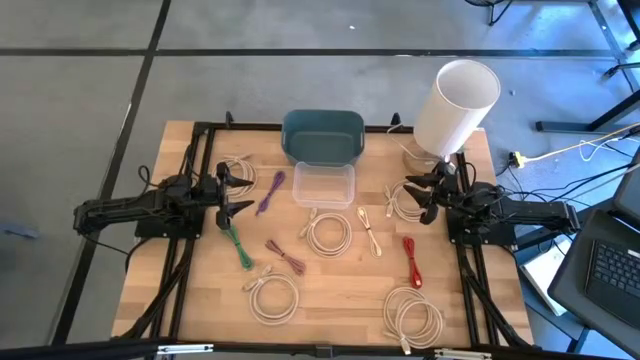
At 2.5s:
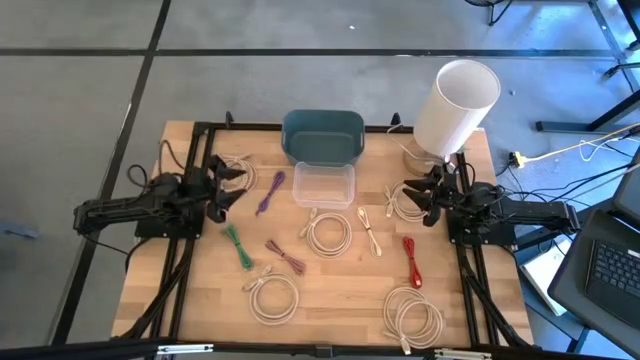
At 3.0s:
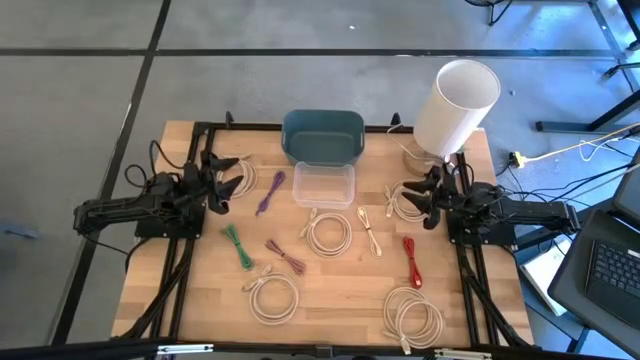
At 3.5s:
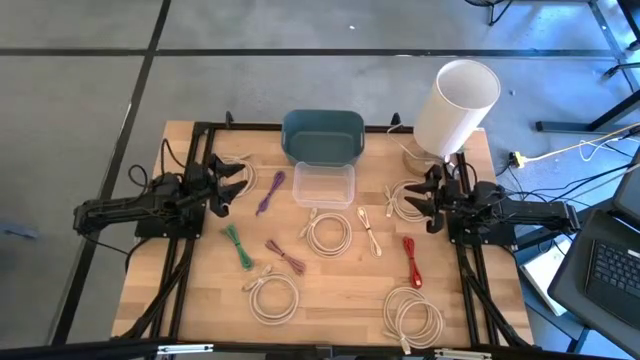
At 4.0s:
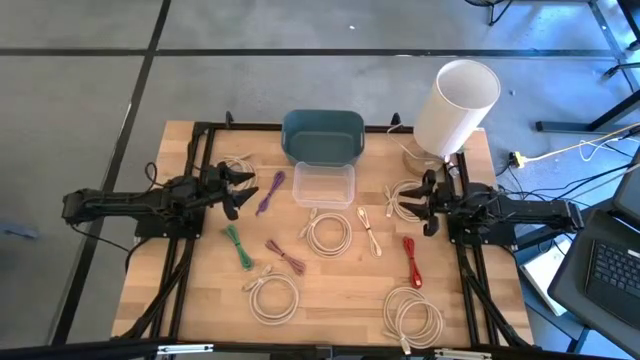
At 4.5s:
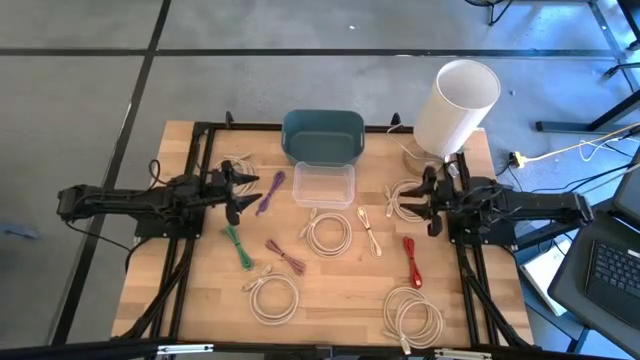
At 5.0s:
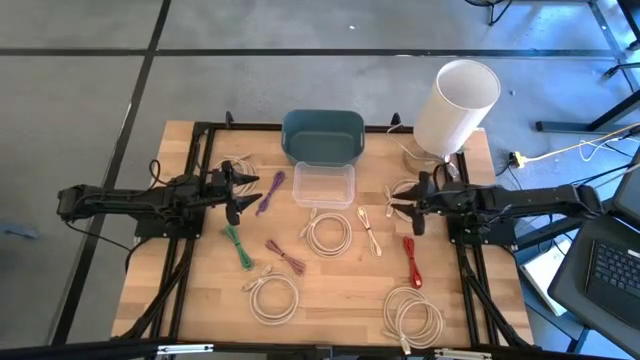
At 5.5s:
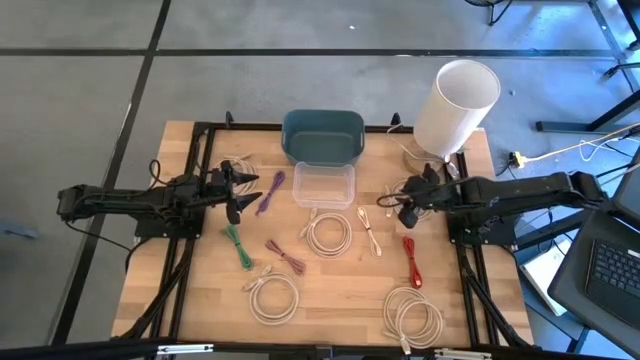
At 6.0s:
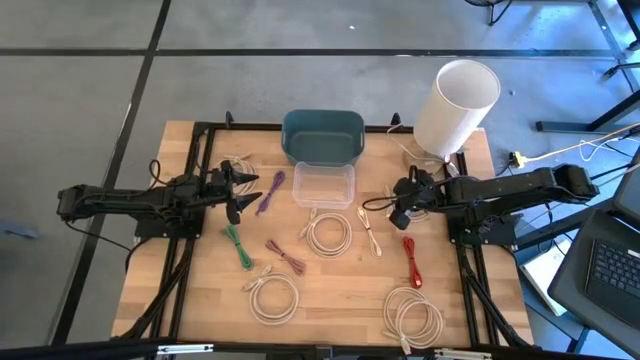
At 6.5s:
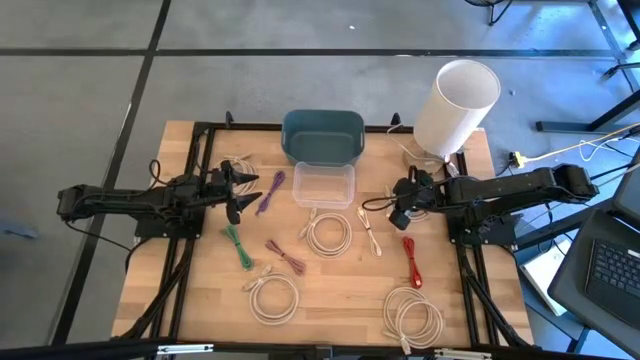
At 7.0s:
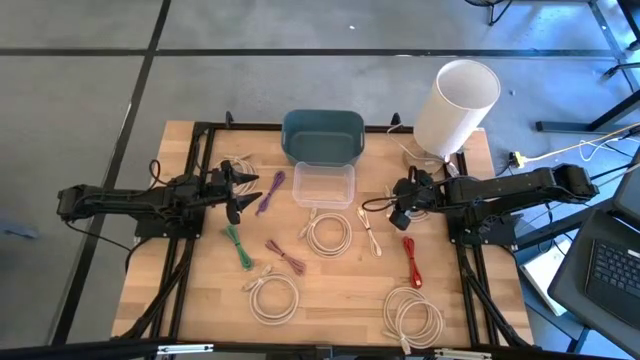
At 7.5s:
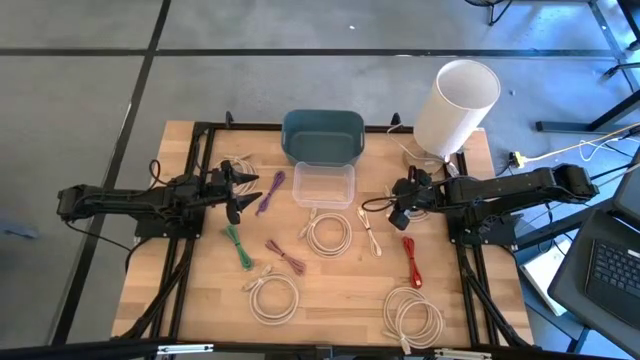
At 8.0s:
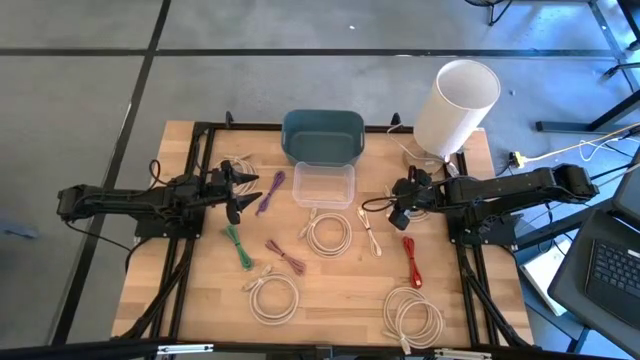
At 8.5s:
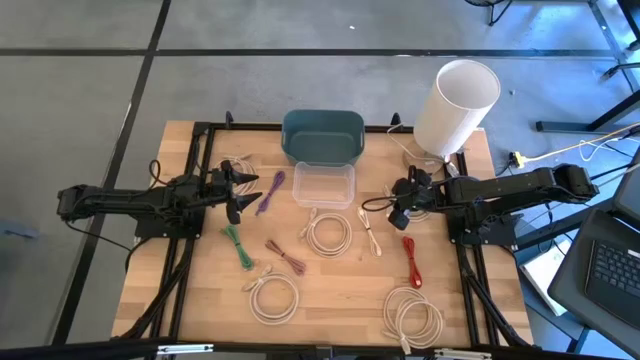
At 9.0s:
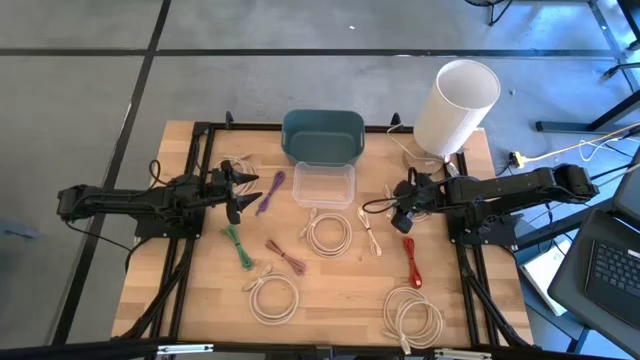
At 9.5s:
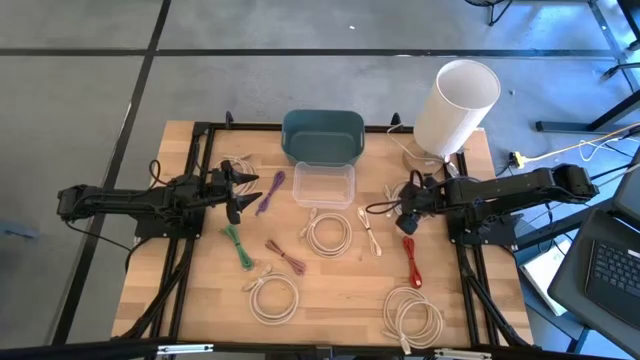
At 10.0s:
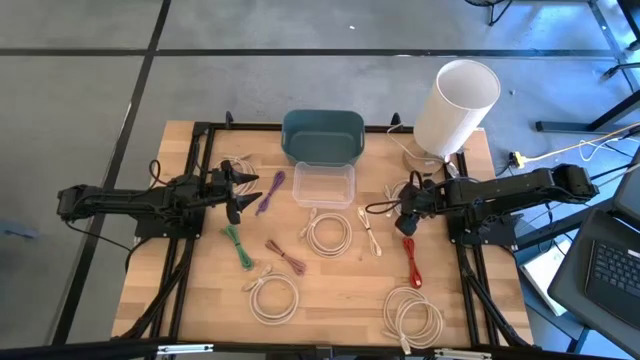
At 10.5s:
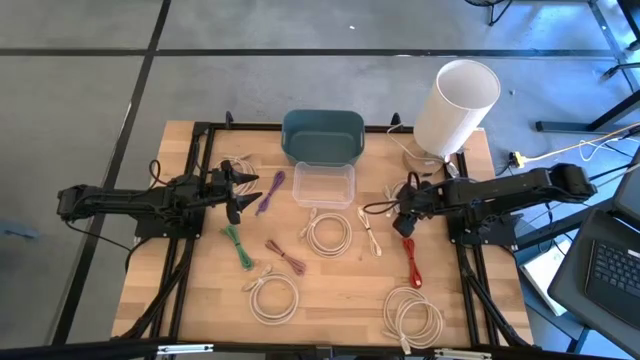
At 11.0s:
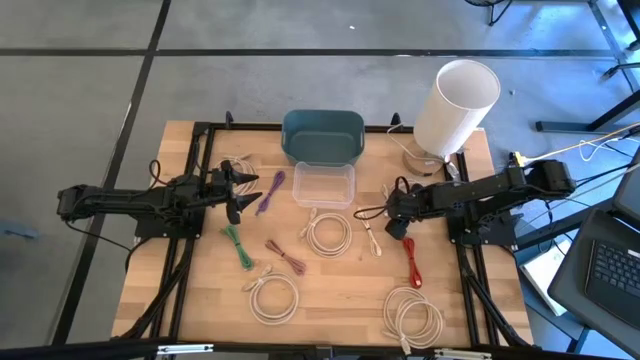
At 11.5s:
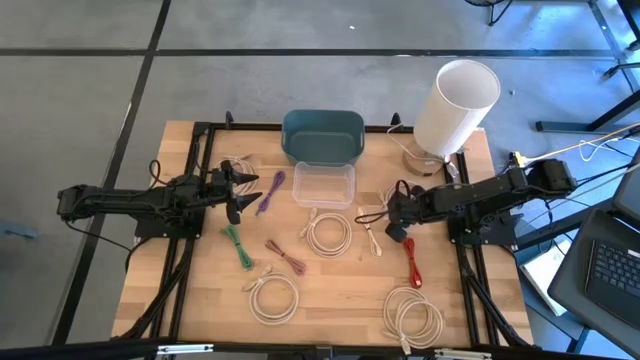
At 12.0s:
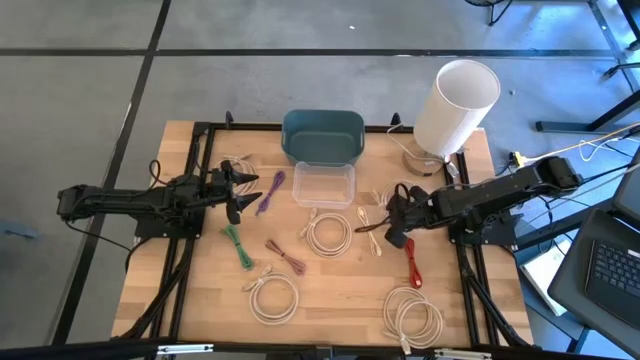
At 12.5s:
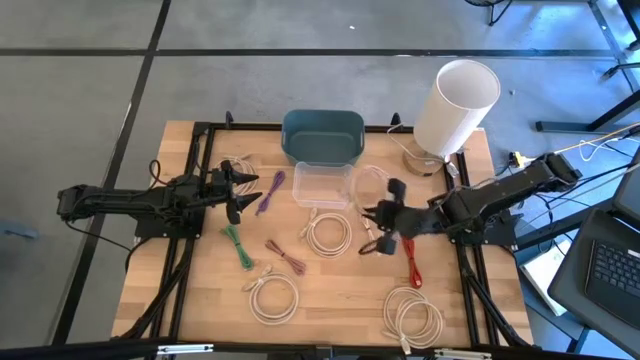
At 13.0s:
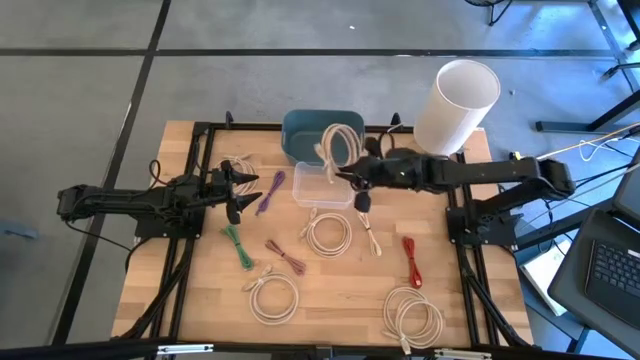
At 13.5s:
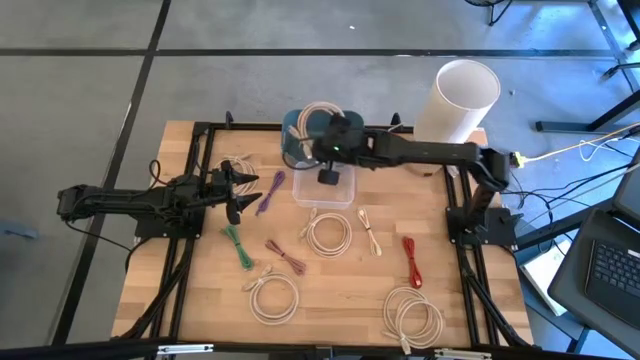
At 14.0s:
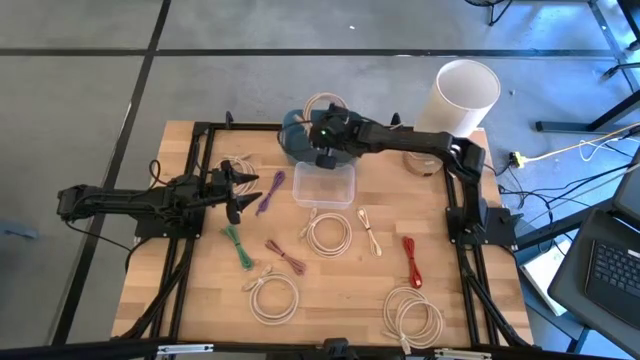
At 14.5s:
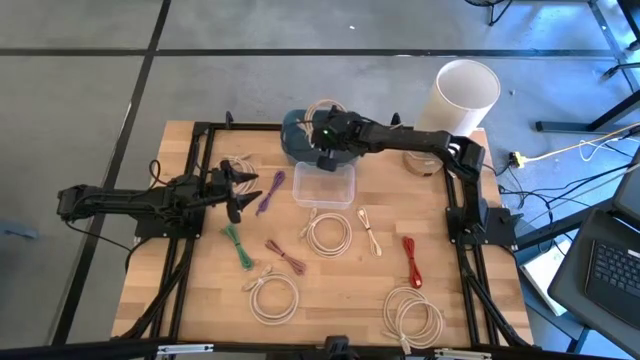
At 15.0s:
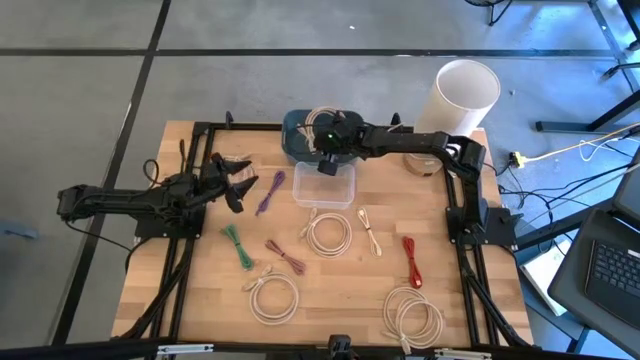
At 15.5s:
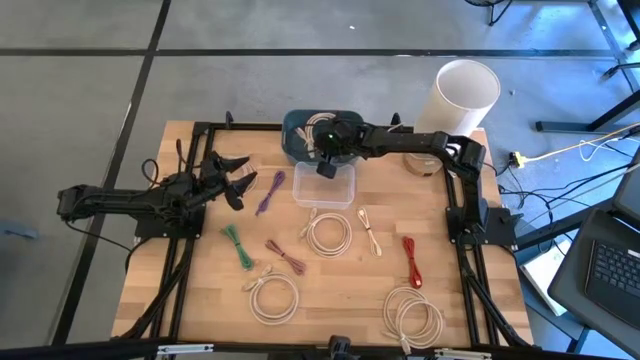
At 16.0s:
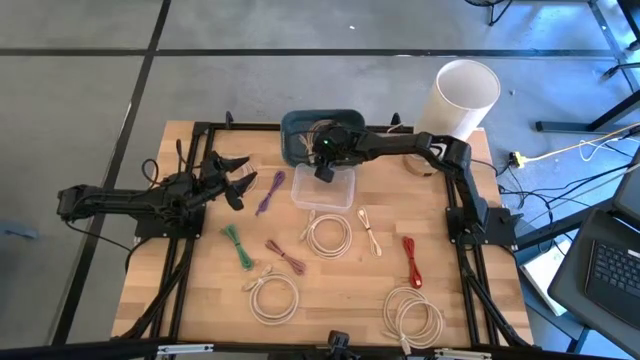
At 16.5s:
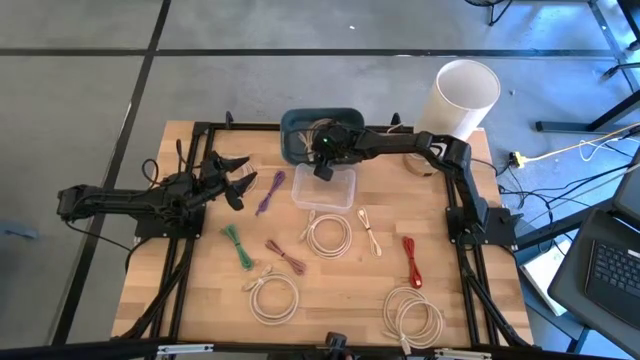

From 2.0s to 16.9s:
Put the brown HDMI cable into the blue bin

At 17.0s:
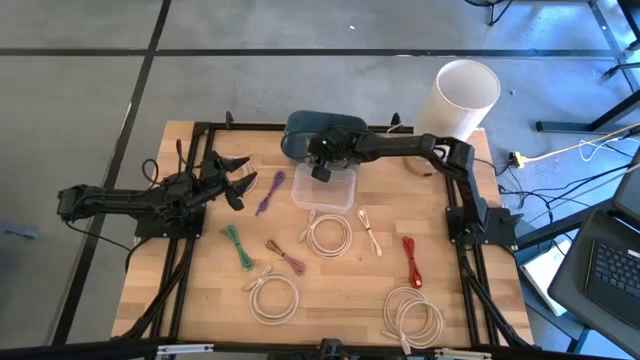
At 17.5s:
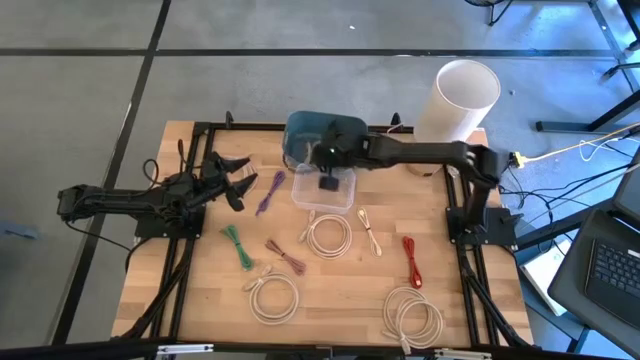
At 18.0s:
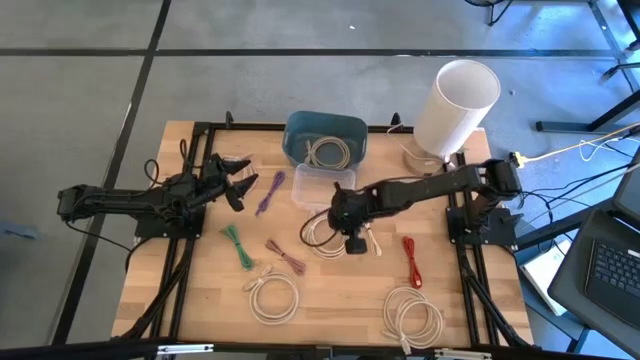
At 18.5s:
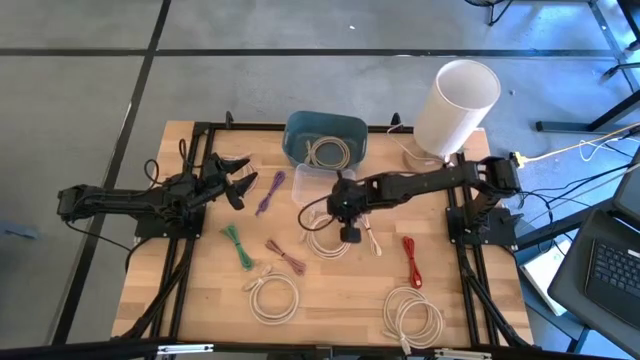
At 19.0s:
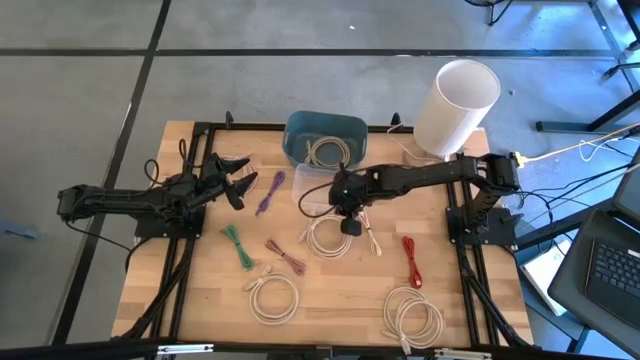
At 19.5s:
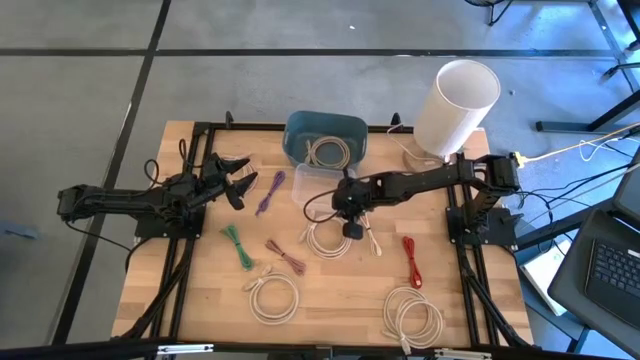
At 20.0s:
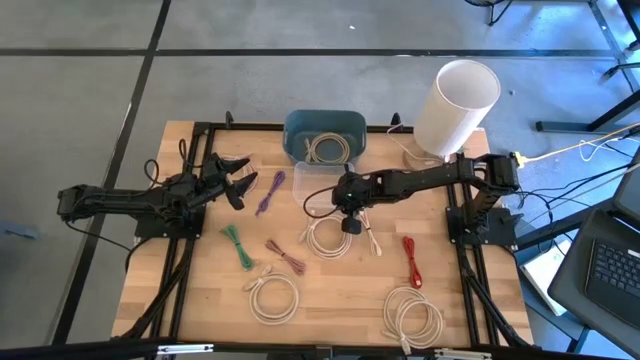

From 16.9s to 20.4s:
Adjust the transparent bin

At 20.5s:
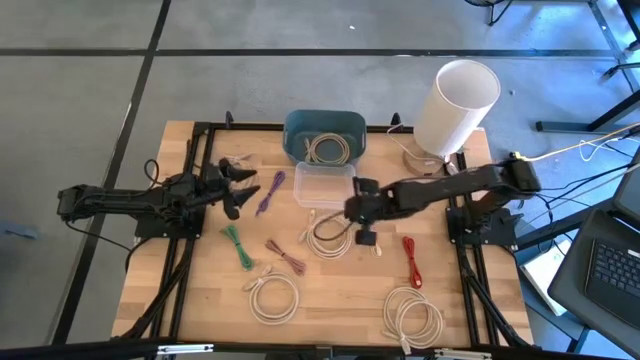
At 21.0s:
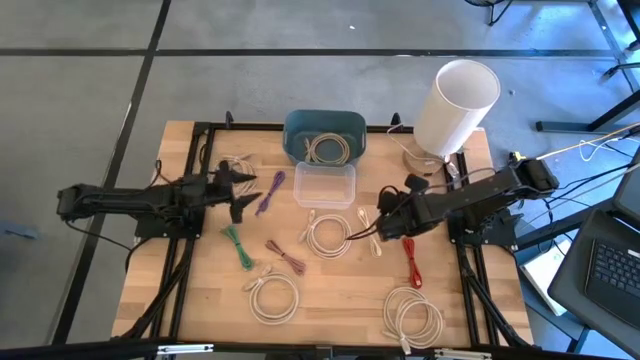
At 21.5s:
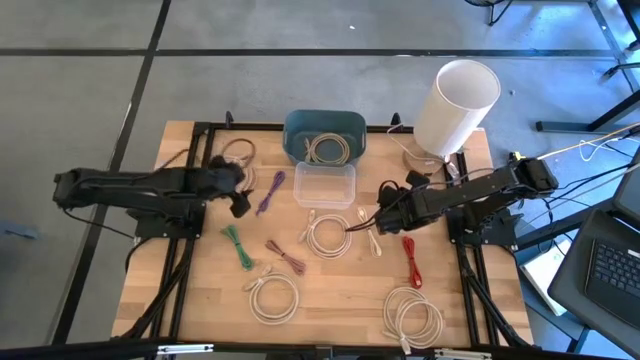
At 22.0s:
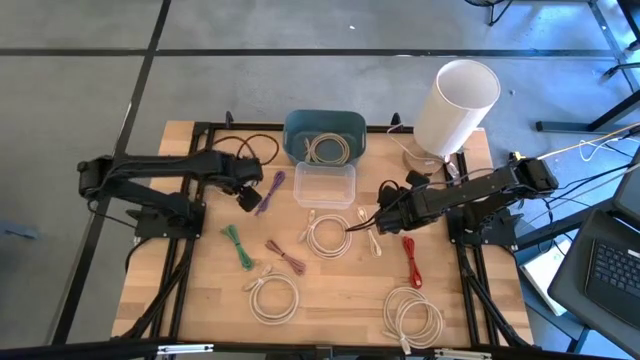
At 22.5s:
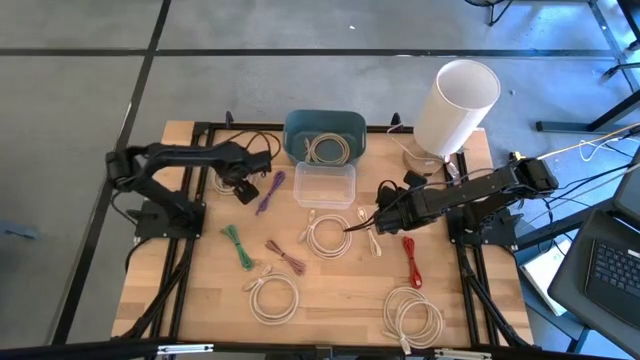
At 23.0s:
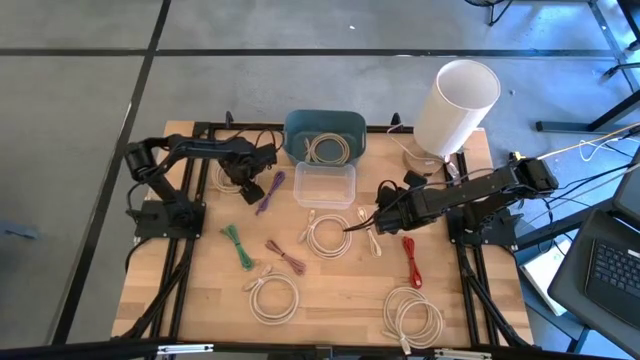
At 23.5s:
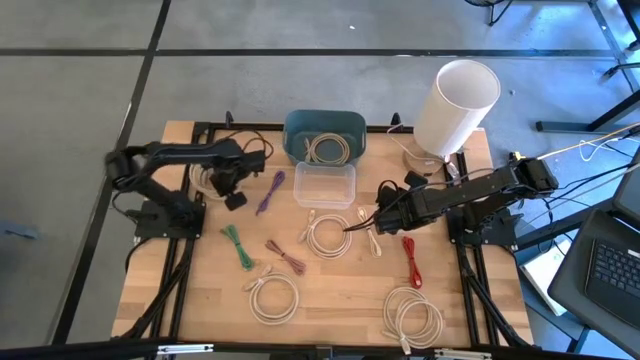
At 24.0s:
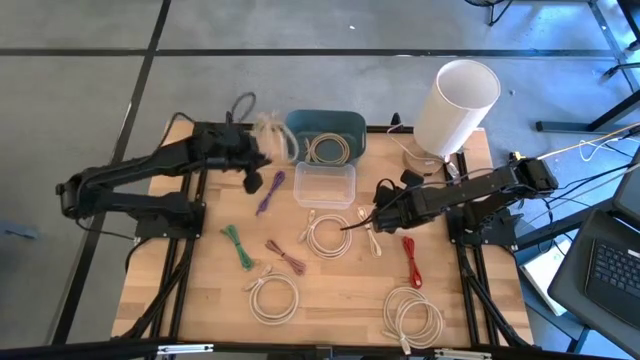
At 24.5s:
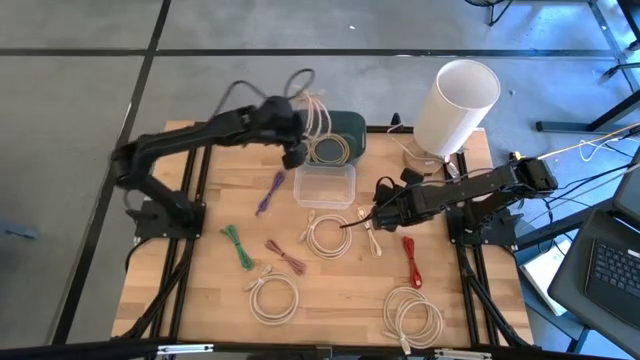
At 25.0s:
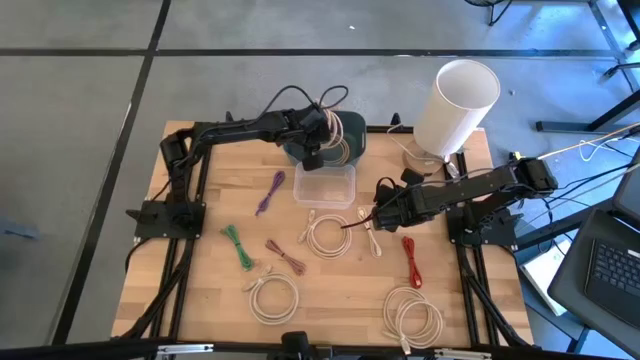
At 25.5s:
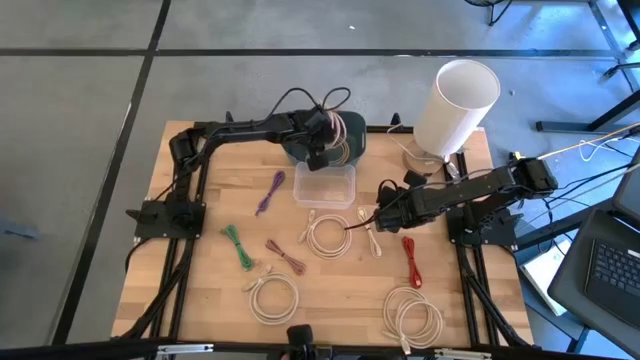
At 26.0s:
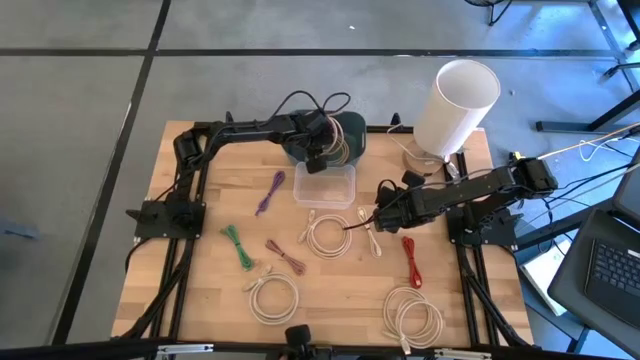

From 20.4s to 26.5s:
Put the brown HDMI cable into the blue bin
